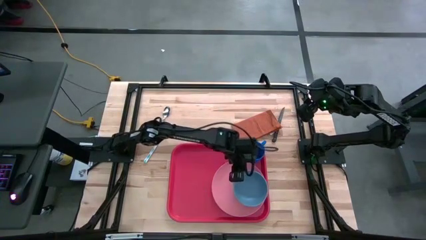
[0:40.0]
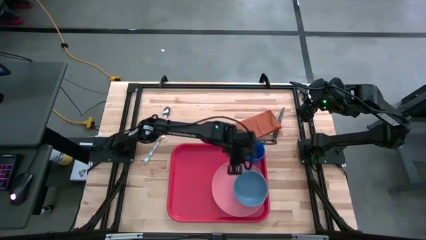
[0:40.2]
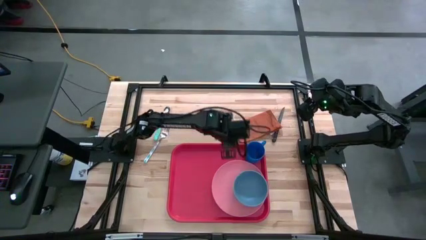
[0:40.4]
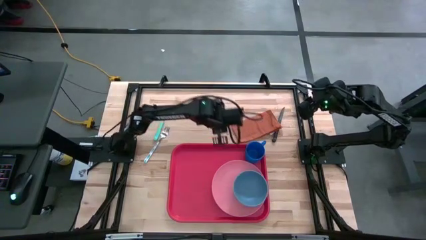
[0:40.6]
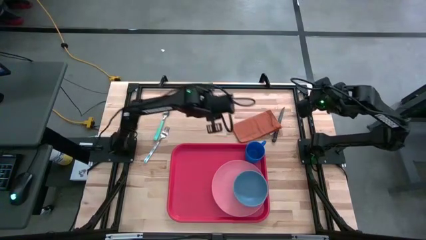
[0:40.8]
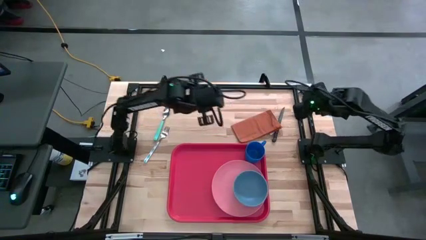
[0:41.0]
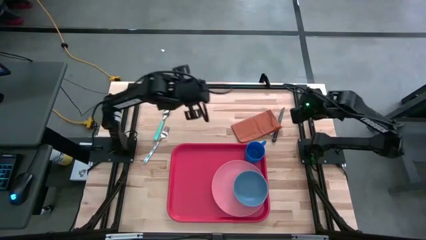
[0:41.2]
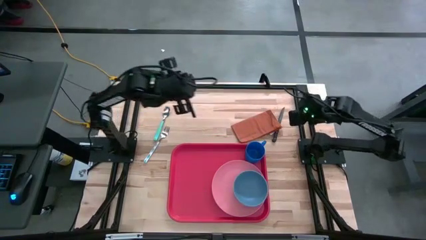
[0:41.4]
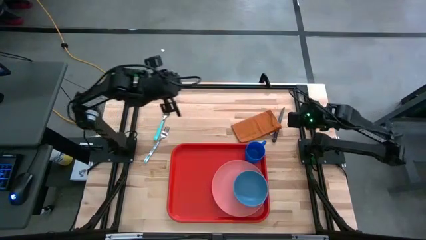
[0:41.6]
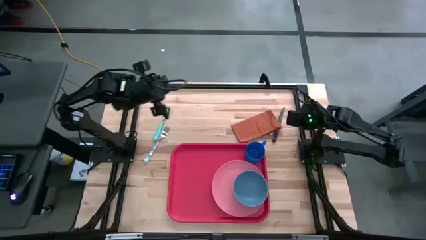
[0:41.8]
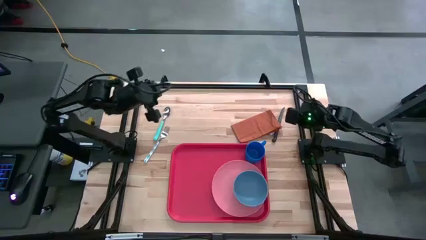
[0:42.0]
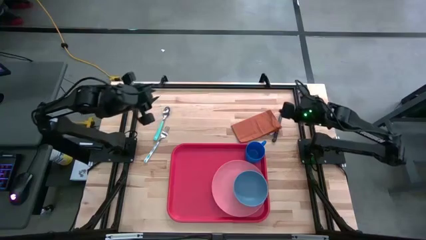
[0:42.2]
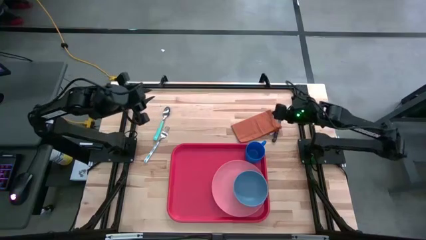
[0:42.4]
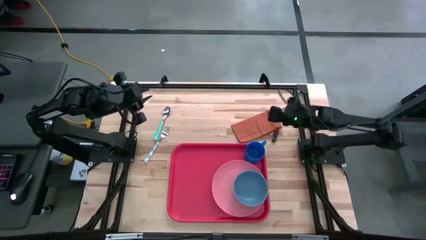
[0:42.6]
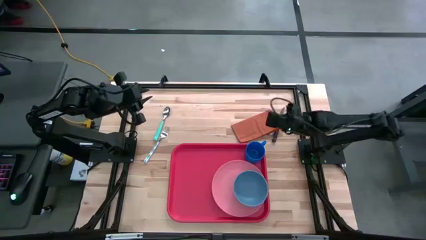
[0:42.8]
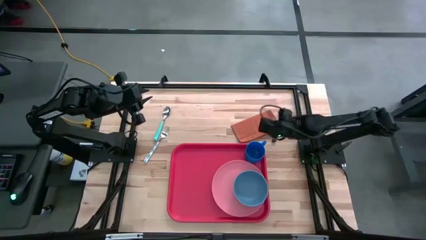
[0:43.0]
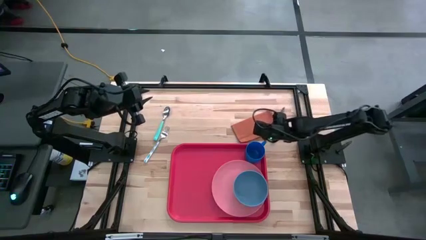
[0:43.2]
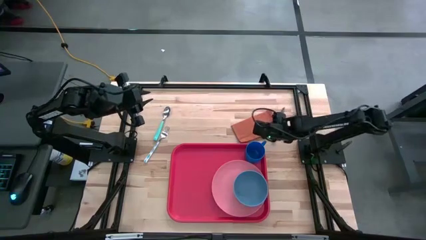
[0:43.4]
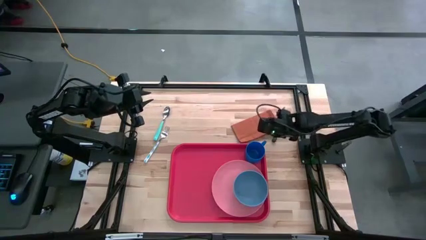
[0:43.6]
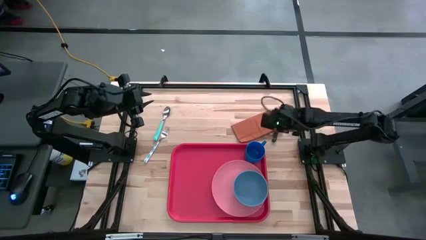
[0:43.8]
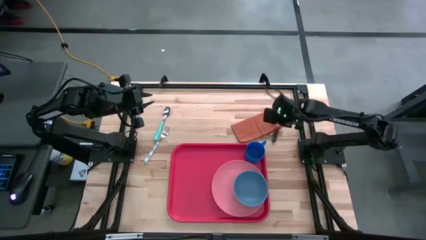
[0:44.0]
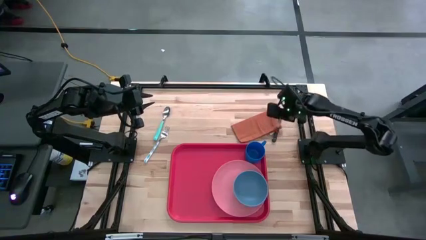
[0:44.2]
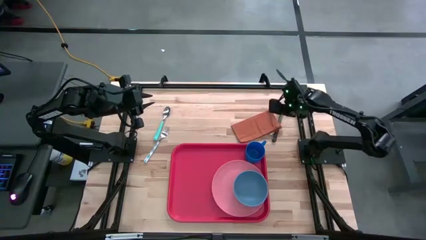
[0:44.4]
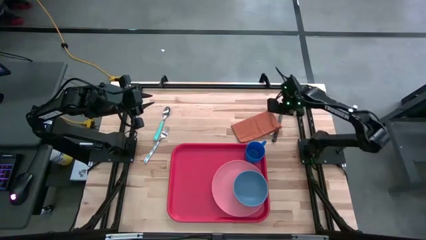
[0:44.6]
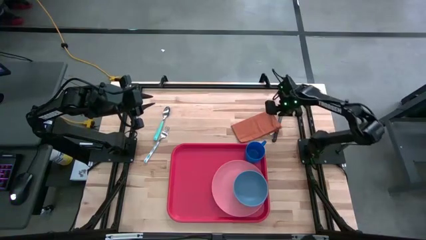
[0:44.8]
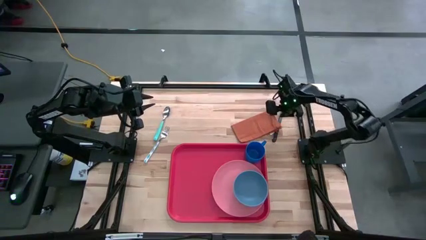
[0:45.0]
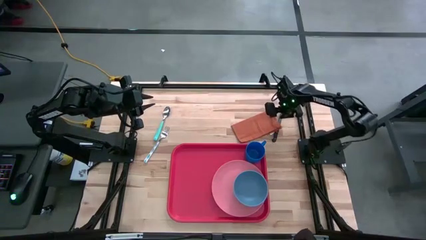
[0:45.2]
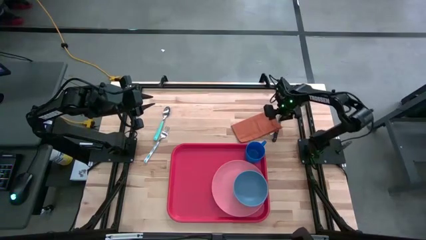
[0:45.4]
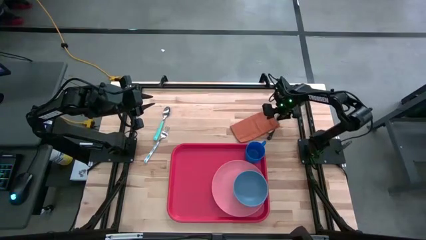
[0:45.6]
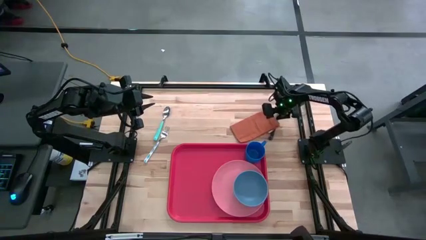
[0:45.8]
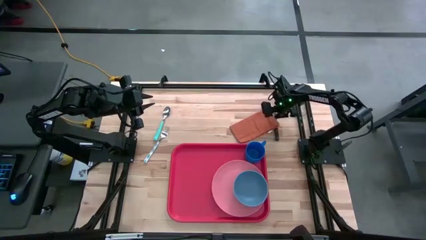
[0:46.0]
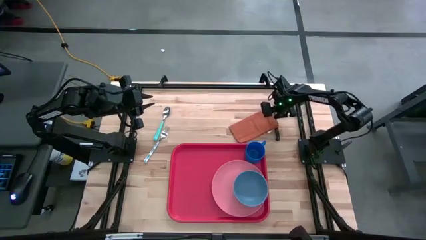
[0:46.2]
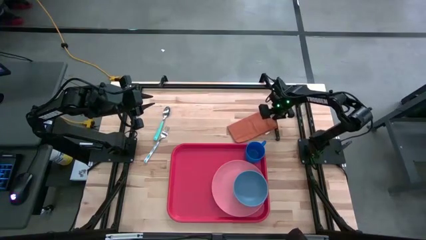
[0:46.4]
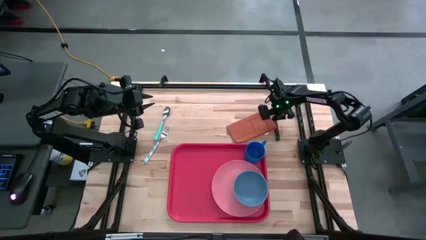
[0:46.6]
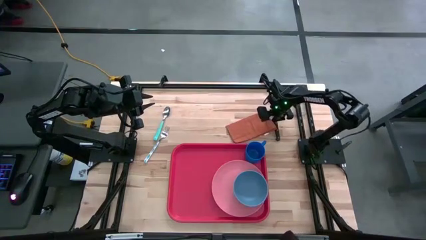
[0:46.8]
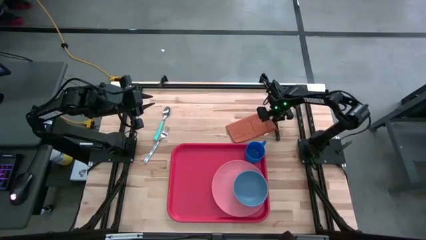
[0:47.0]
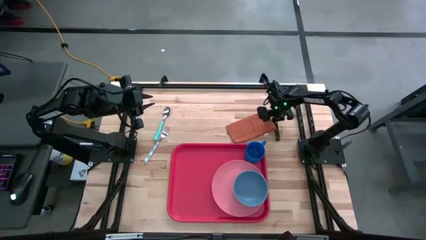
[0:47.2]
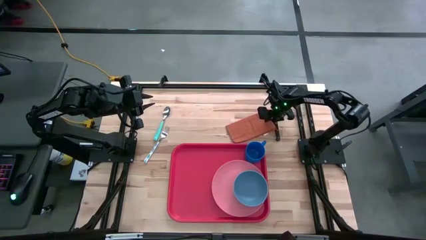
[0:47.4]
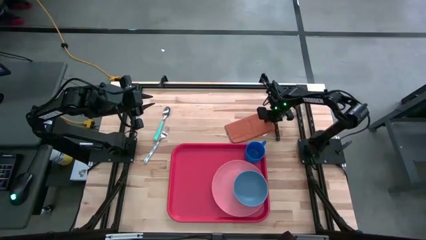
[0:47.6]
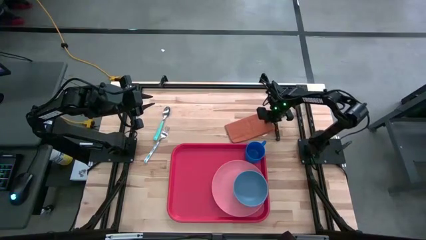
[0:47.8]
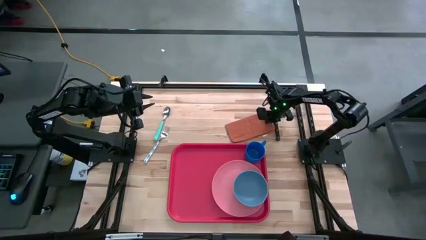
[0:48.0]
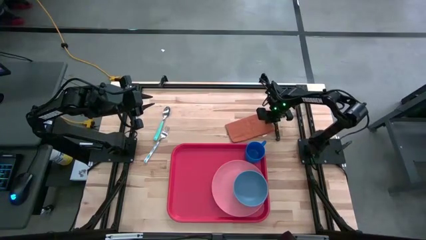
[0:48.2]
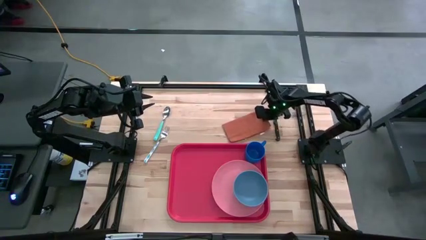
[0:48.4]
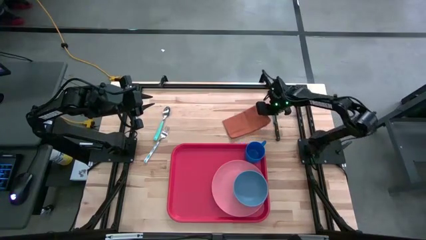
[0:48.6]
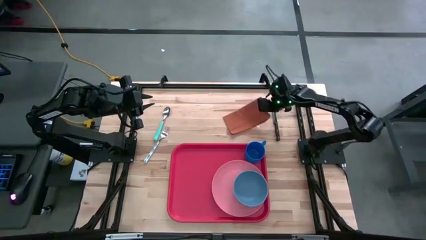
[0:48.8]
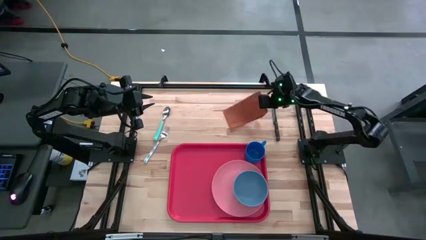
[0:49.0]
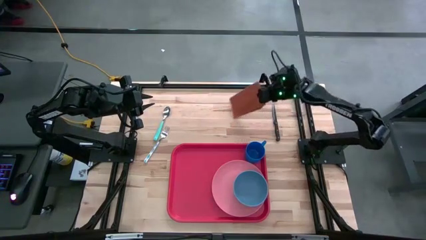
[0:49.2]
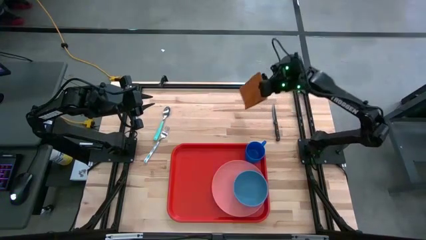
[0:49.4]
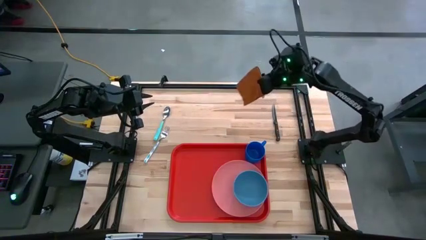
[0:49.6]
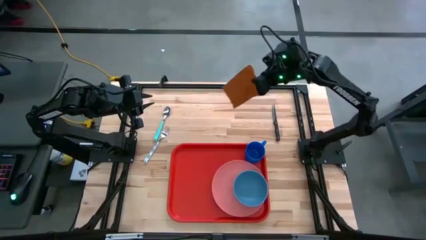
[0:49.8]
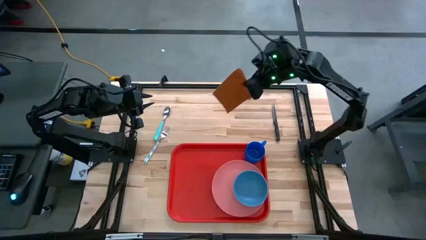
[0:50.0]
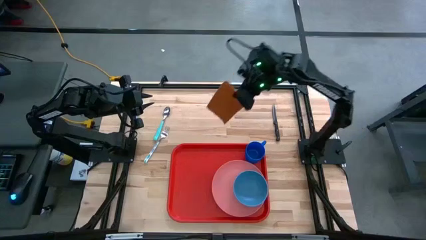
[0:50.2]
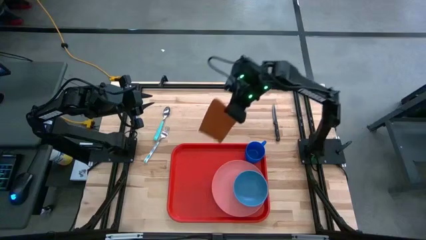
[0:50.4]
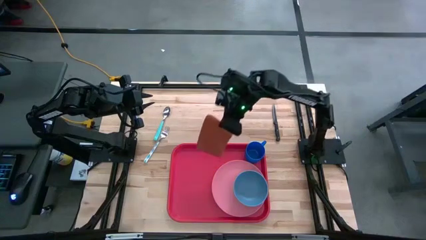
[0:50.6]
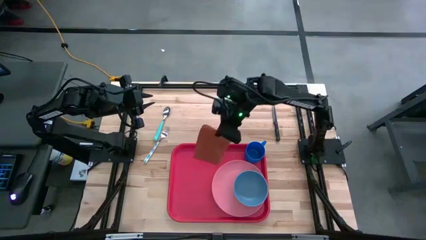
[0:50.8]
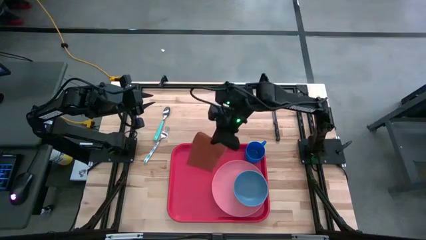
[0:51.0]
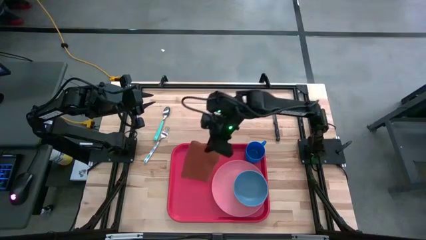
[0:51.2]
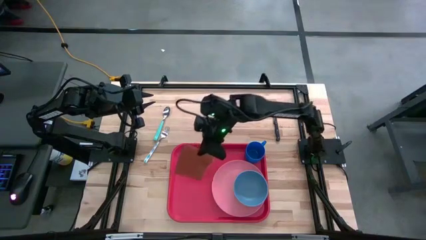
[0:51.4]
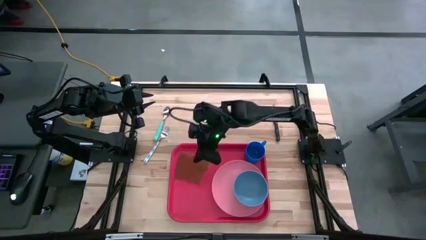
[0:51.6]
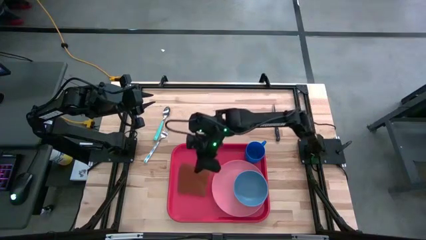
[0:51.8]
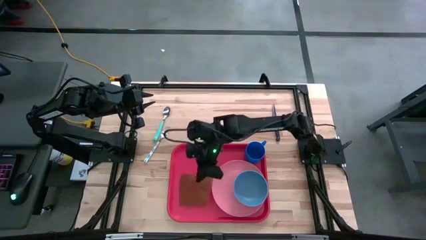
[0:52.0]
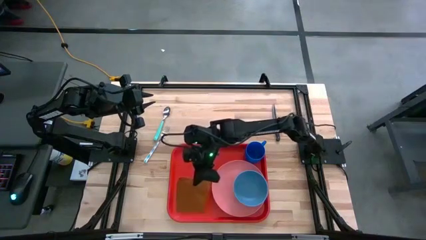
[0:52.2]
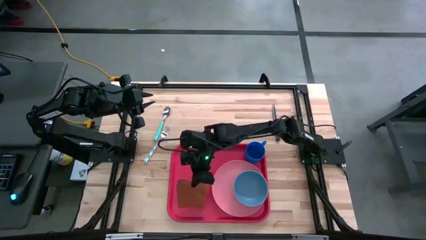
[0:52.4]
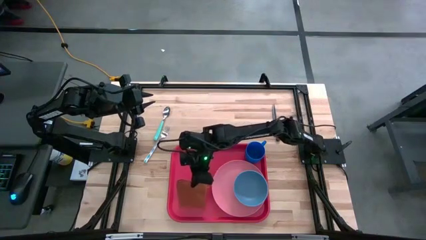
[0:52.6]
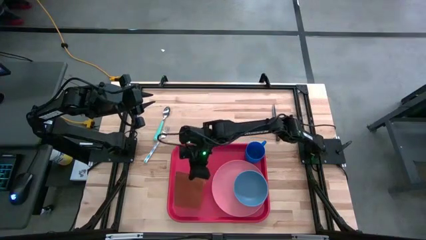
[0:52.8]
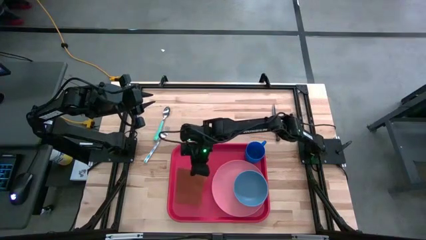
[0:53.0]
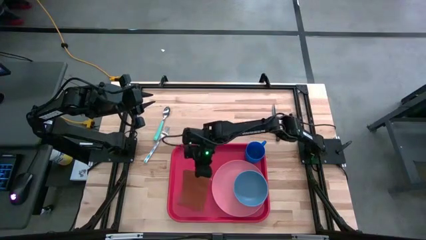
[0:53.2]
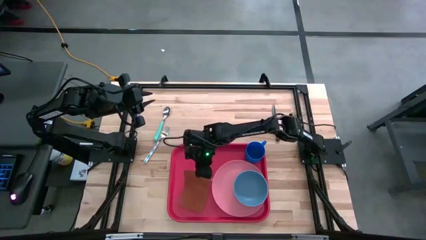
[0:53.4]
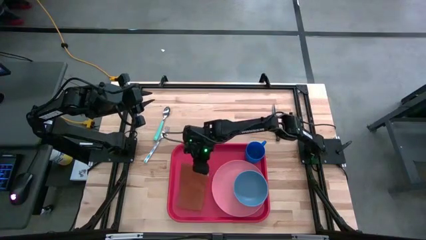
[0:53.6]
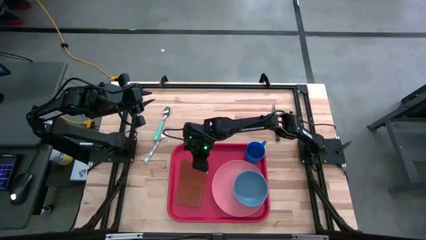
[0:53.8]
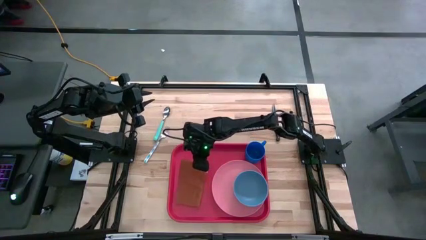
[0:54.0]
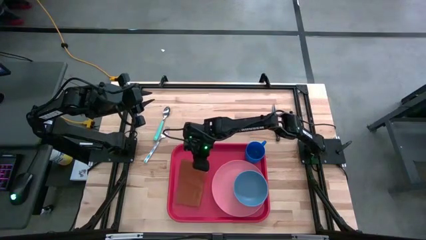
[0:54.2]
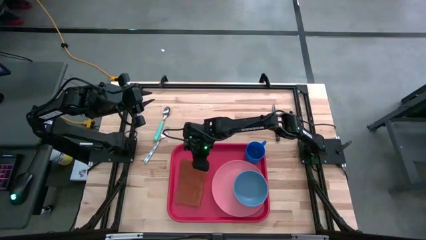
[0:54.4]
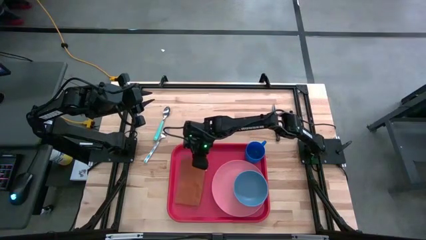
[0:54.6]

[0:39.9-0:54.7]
Task: Set up tray
Put the orange napkin on the left side of the pink plate
